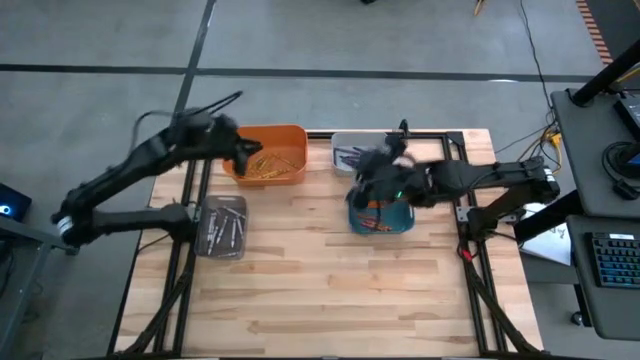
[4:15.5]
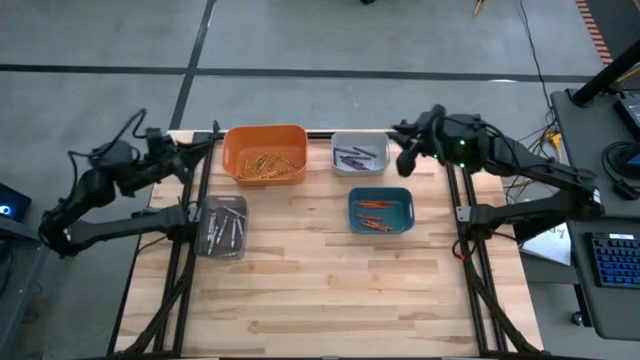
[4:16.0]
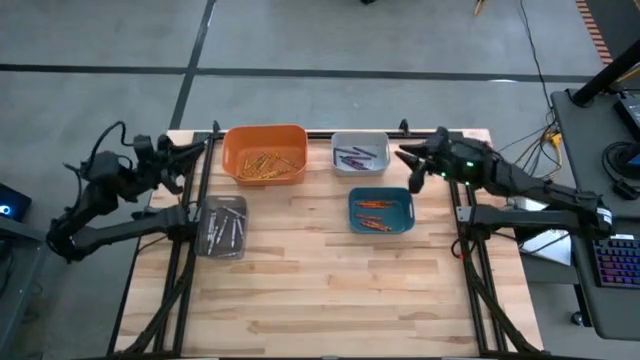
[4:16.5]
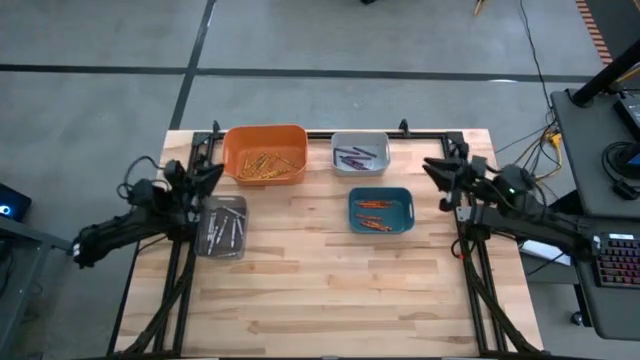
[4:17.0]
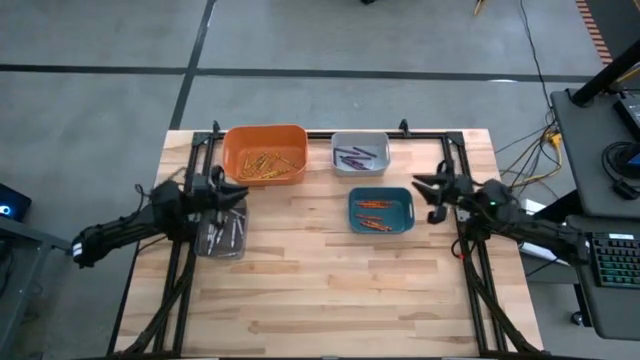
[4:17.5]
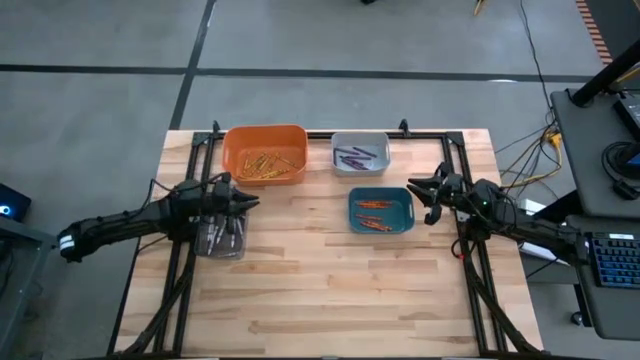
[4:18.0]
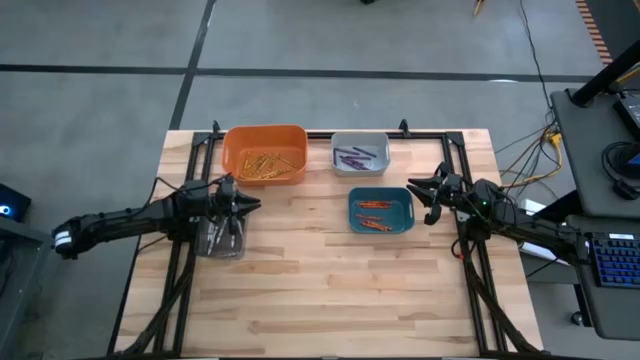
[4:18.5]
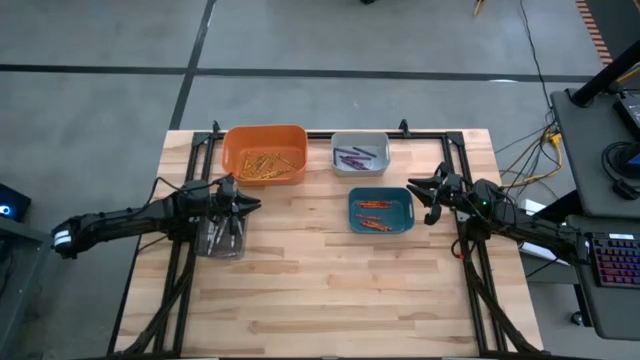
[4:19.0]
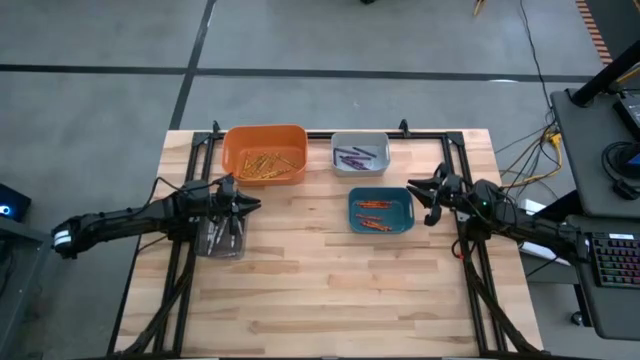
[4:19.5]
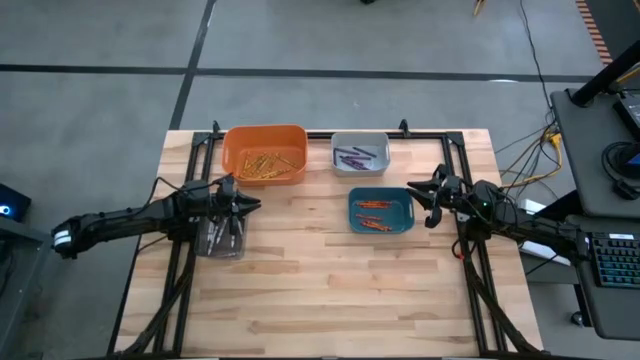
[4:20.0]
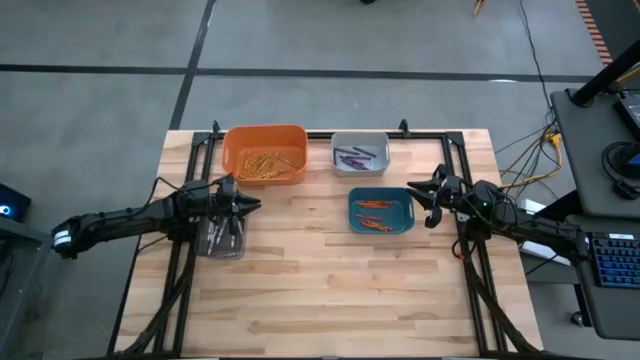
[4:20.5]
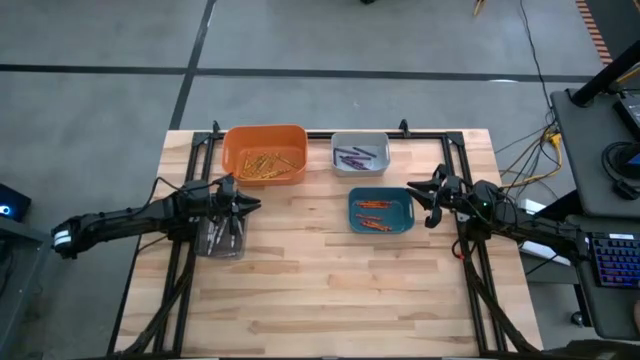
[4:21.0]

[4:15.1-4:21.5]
Task: Sort crayons
Return to Home Position

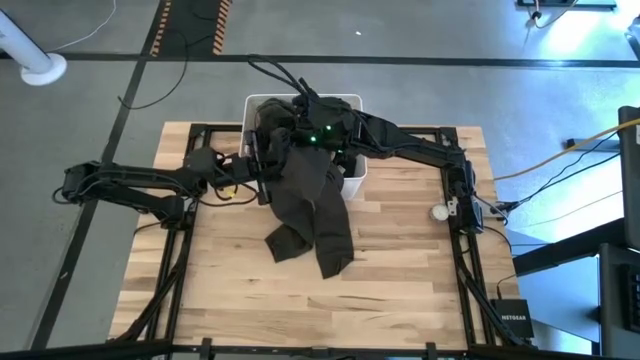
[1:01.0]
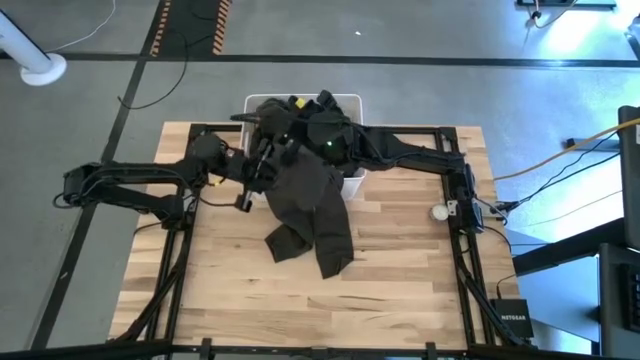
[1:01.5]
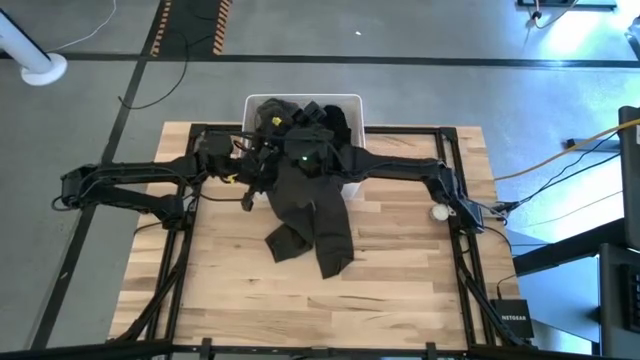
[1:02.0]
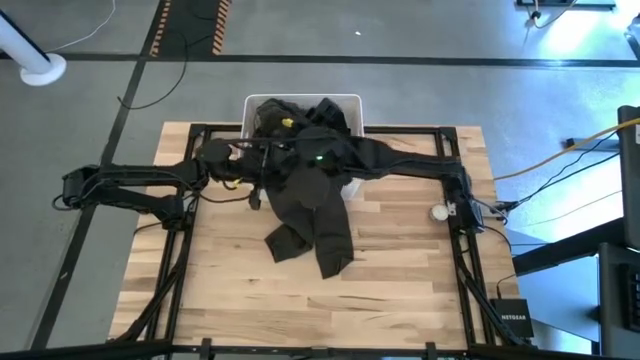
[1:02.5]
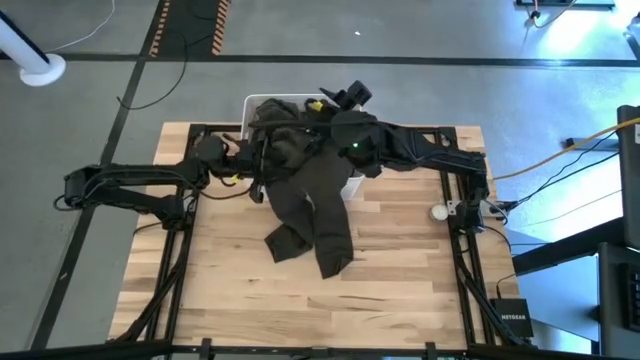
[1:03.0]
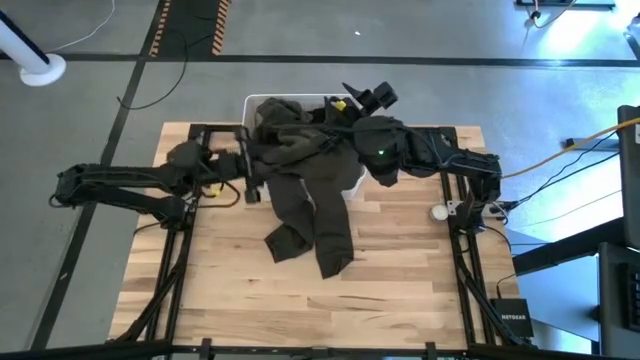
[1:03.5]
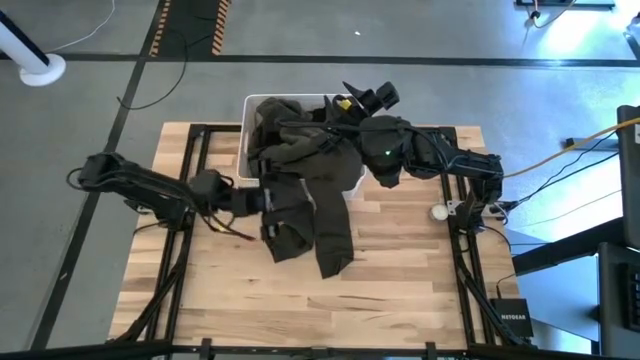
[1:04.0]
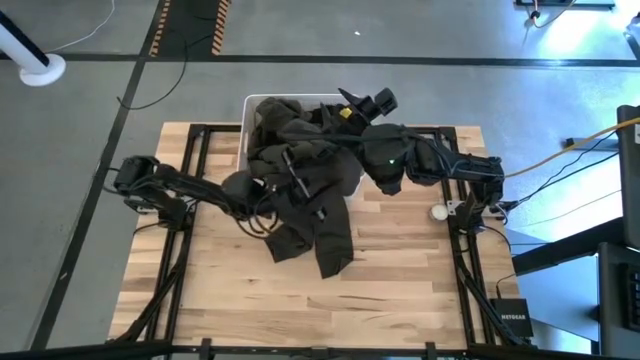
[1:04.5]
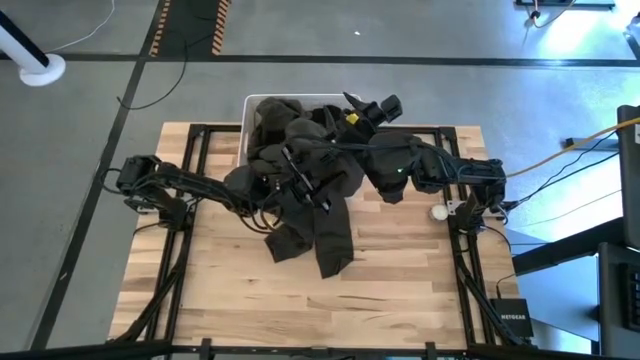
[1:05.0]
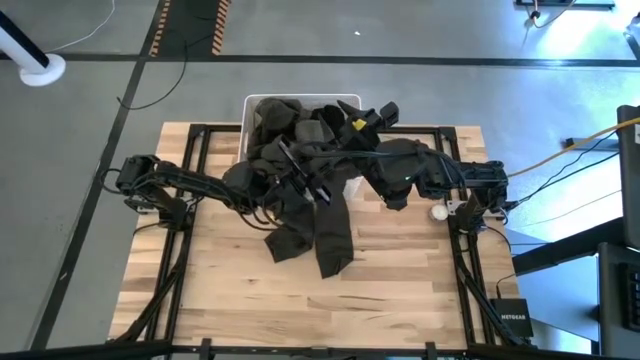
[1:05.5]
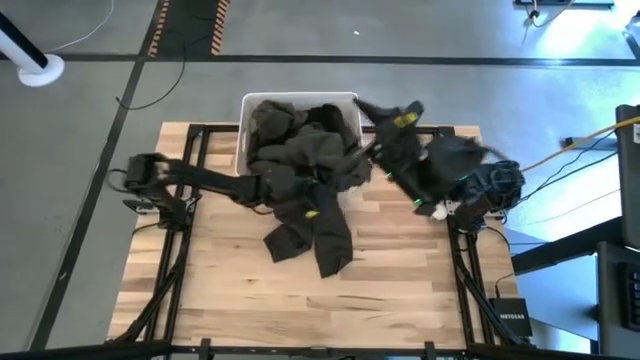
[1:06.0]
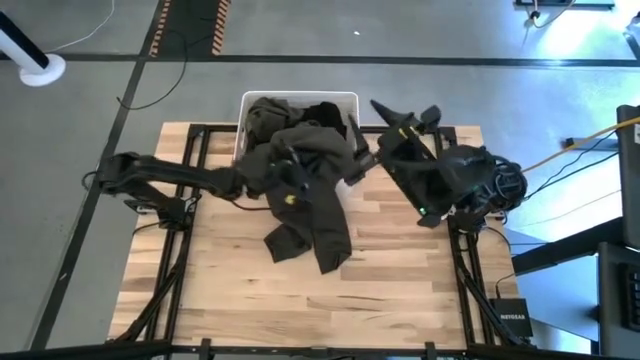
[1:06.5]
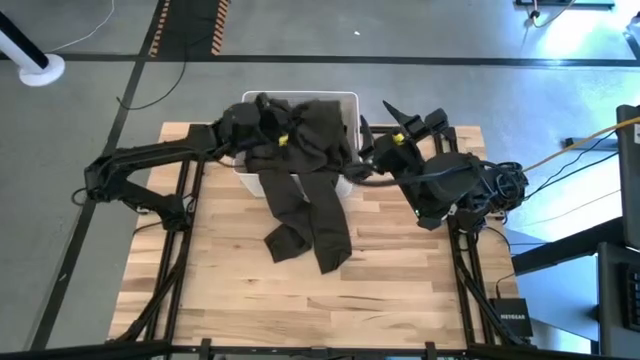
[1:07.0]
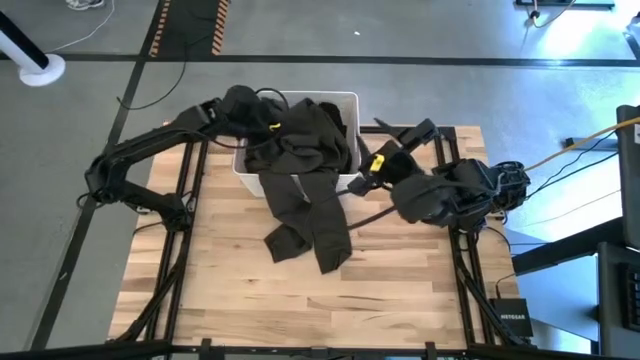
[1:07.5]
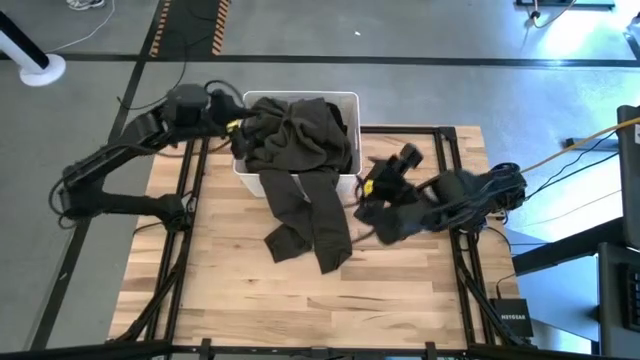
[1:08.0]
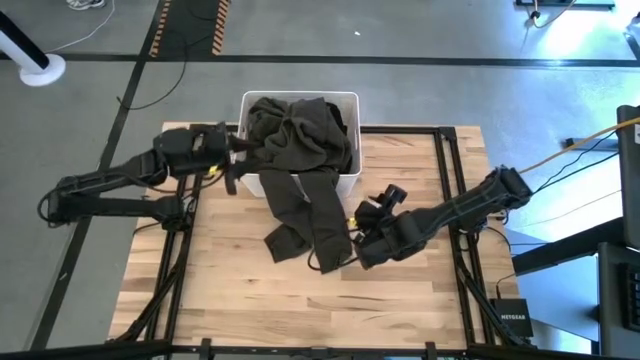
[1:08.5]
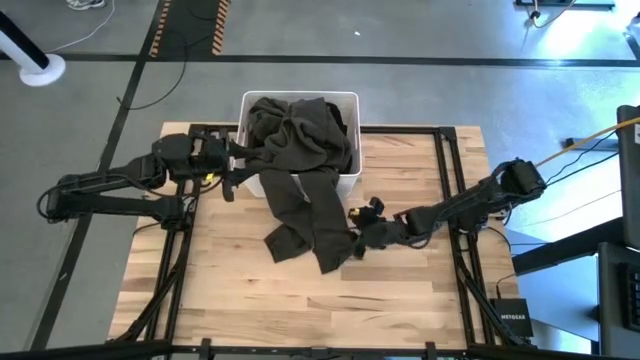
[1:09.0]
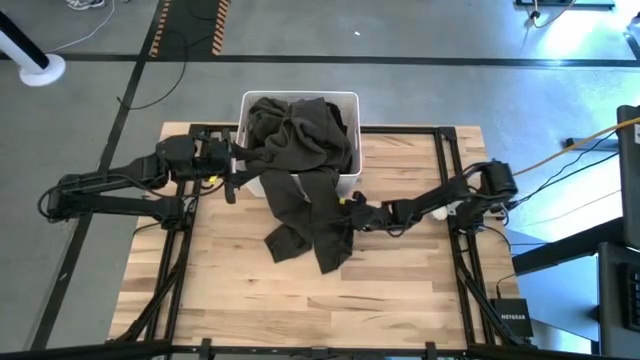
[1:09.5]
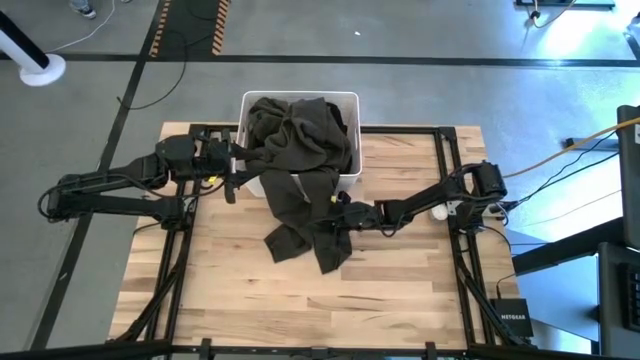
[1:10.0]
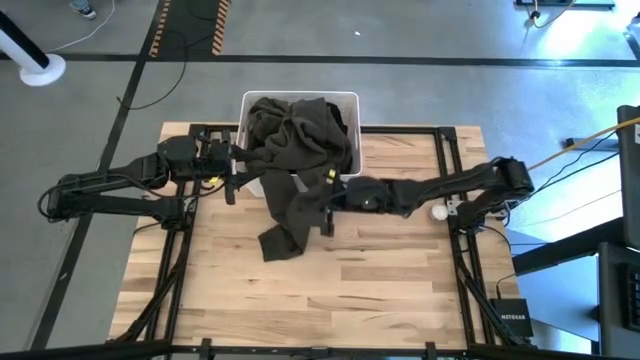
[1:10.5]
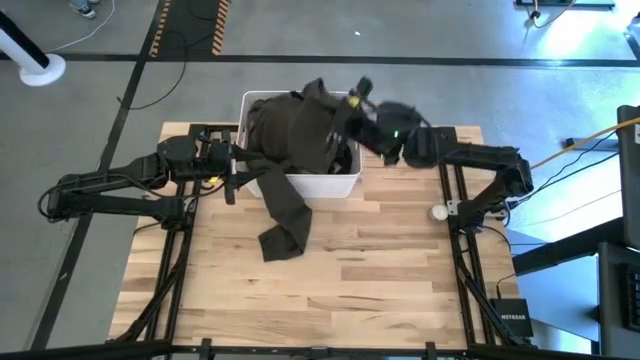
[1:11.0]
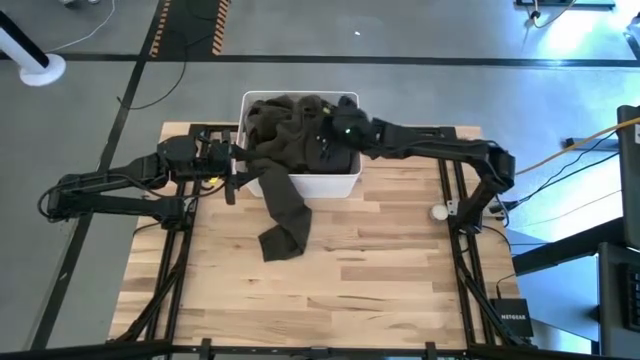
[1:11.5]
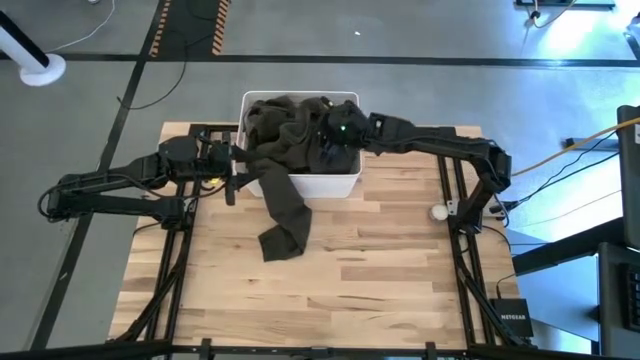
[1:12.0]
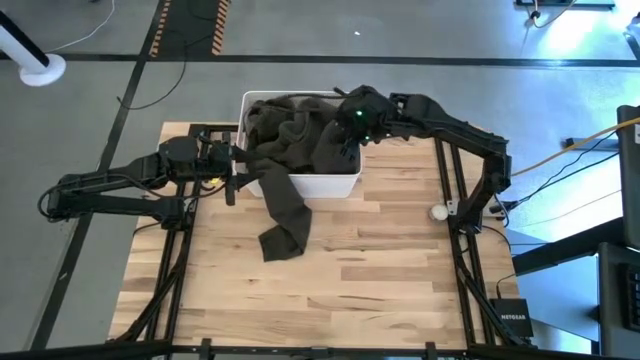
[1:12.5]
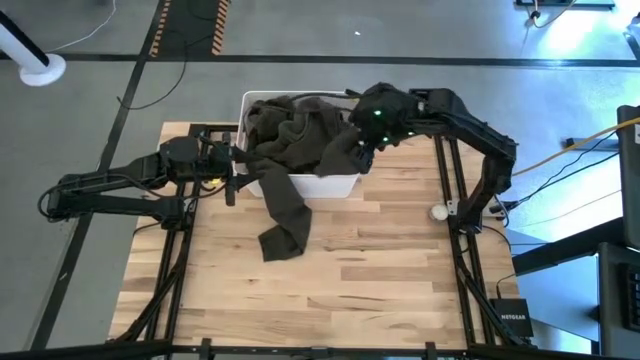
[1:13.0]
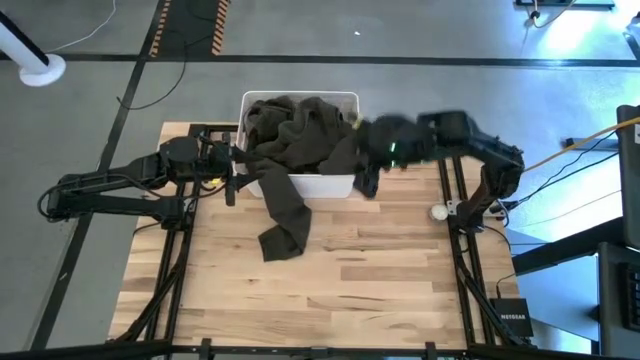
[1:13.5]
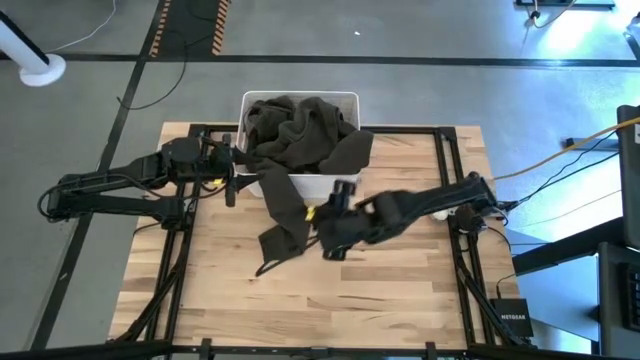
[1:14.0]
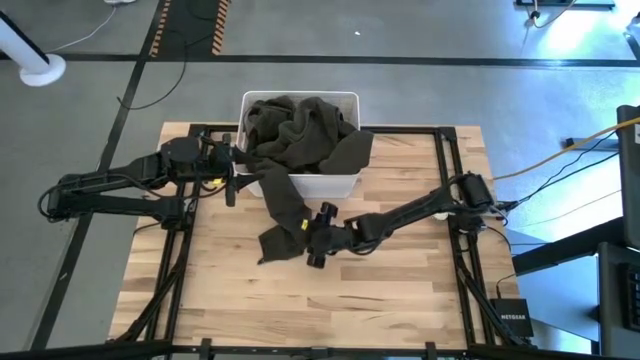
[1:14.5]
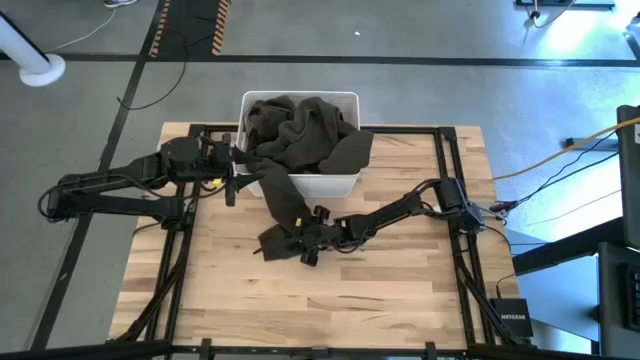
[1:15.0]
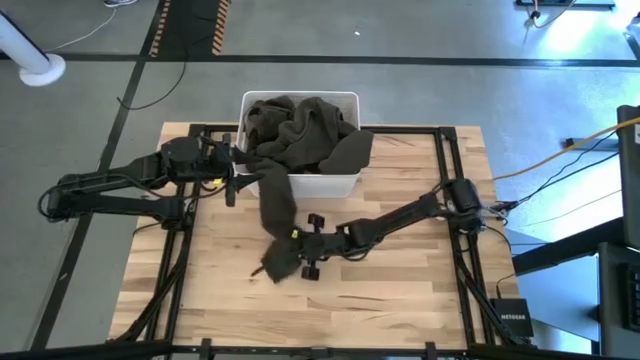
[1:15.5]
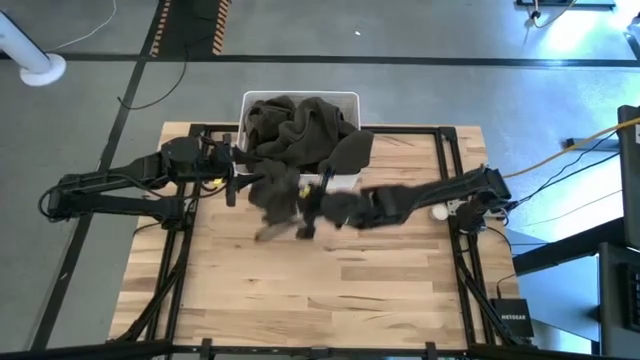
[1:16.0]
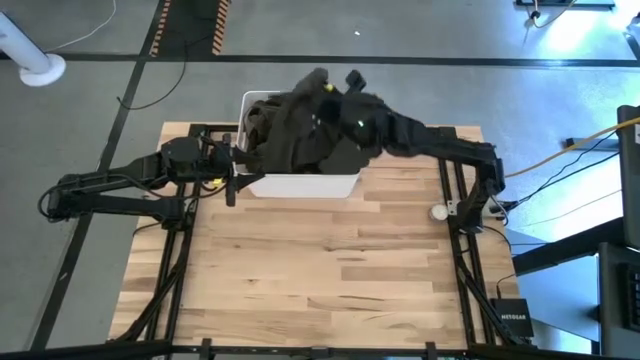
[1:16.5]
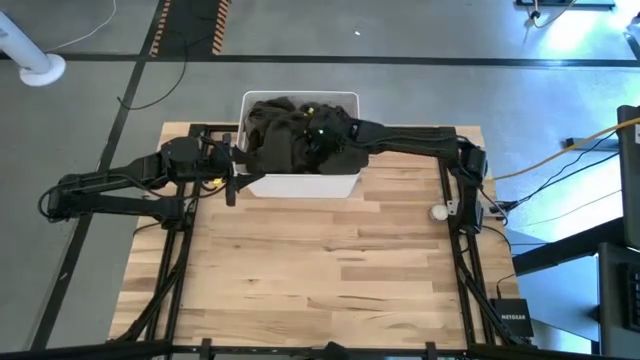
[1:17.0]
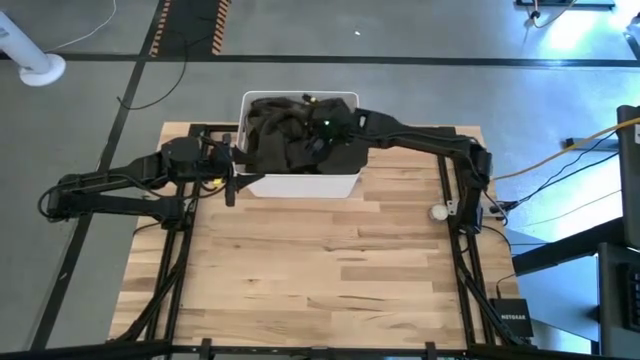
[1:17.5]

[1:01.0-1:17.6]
Task: Sort clothes
Put the gray pants into the white laundry organizer
